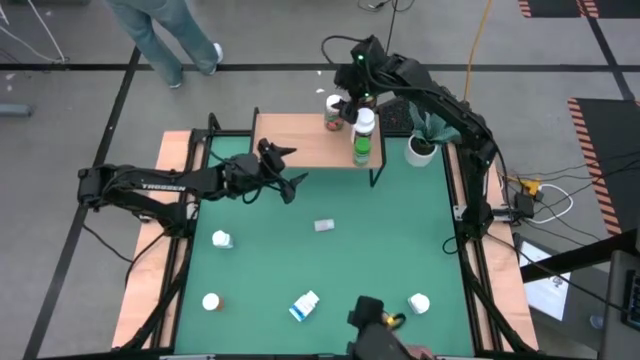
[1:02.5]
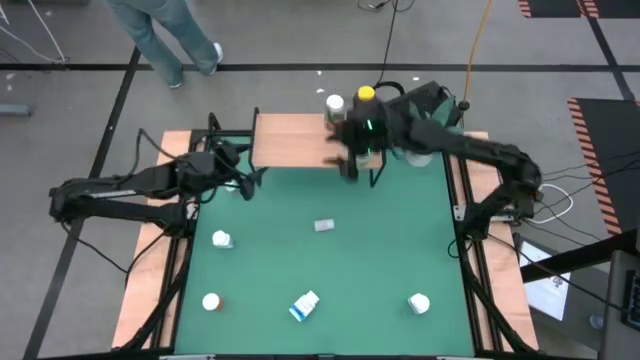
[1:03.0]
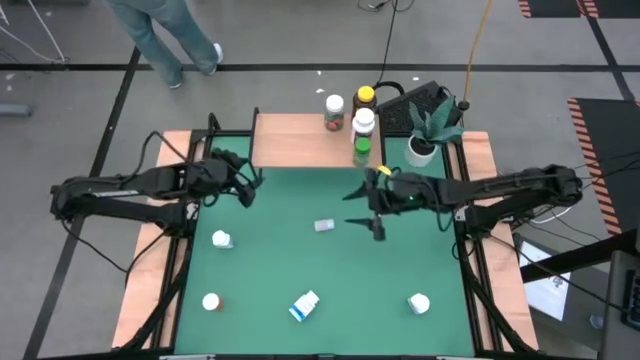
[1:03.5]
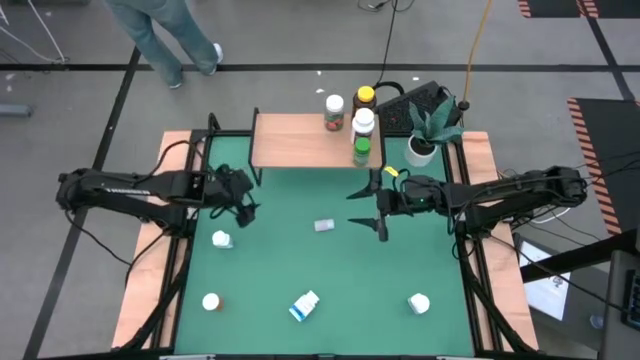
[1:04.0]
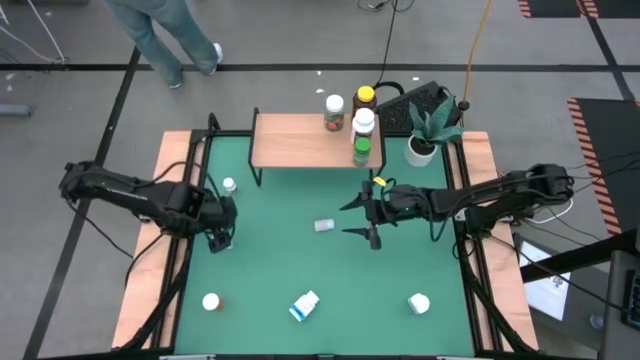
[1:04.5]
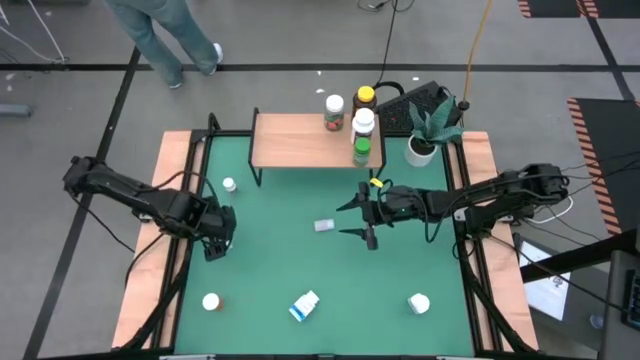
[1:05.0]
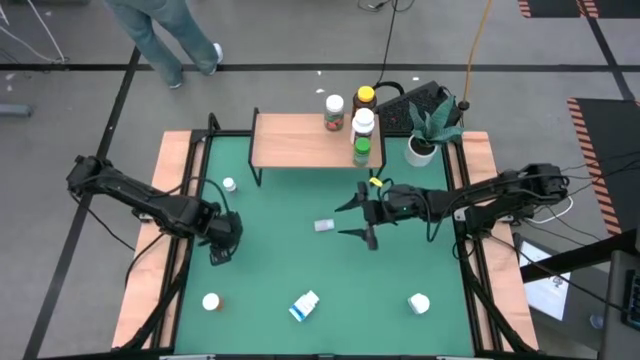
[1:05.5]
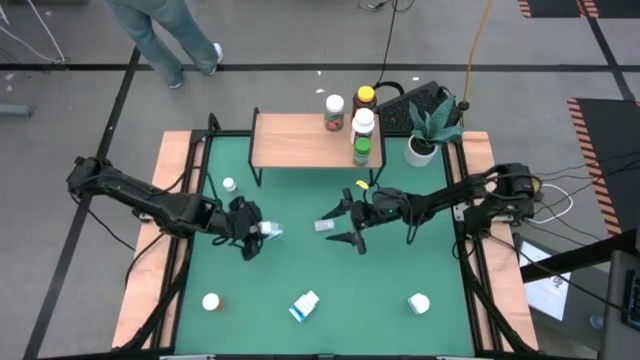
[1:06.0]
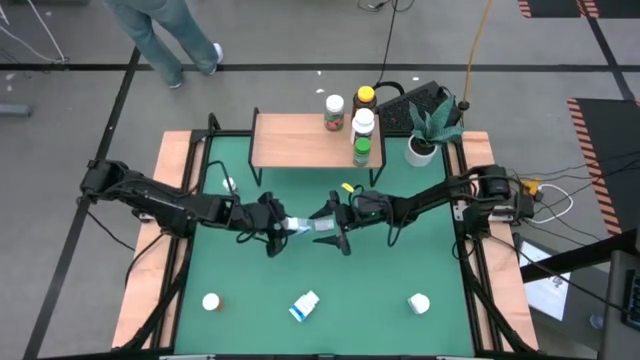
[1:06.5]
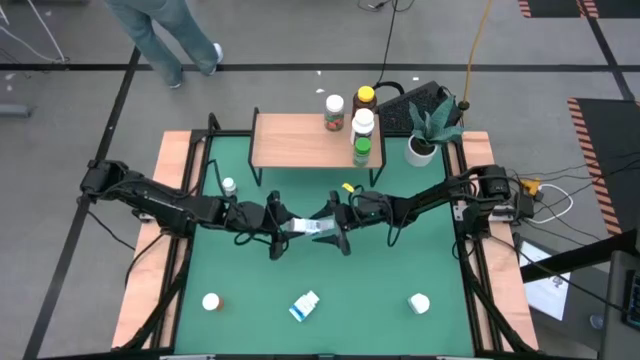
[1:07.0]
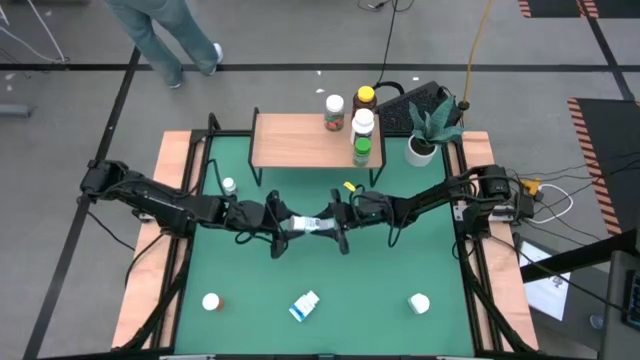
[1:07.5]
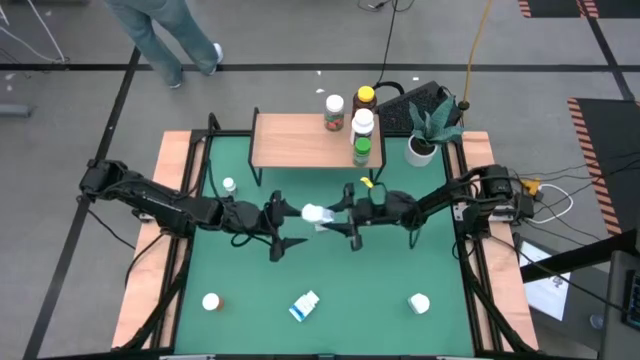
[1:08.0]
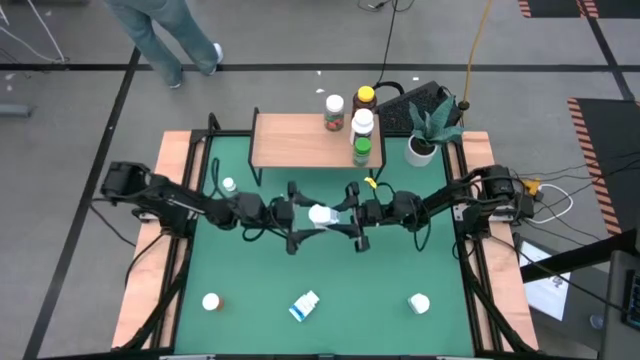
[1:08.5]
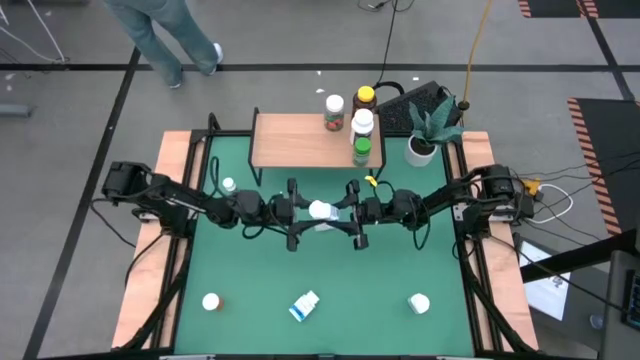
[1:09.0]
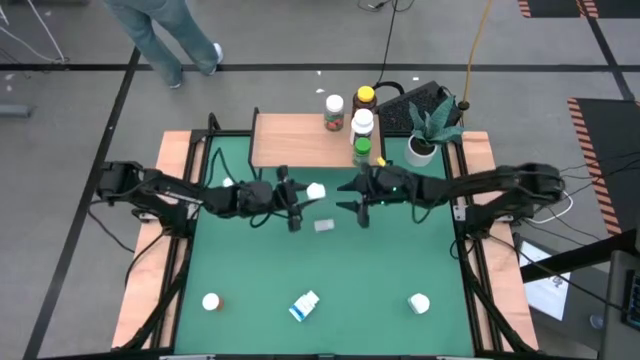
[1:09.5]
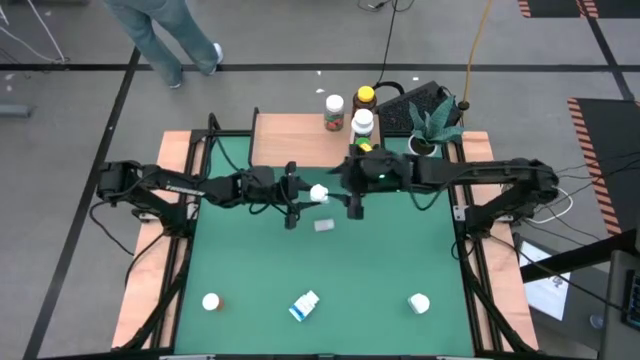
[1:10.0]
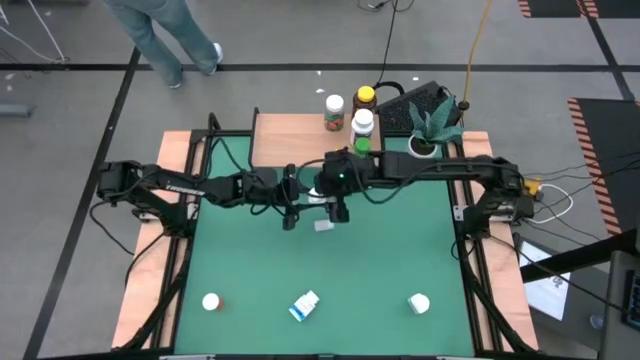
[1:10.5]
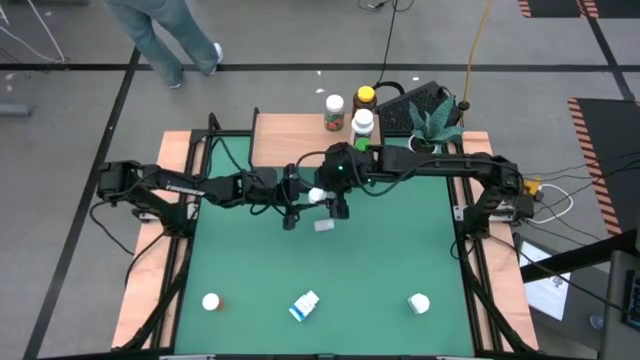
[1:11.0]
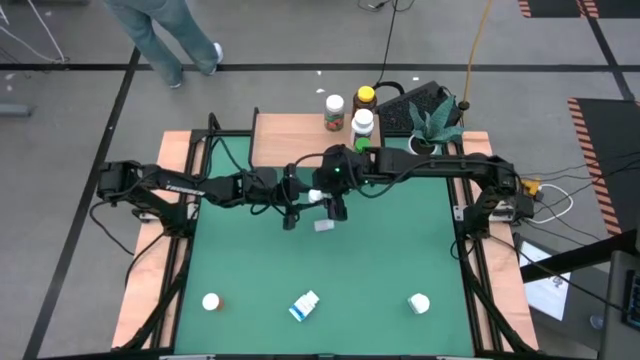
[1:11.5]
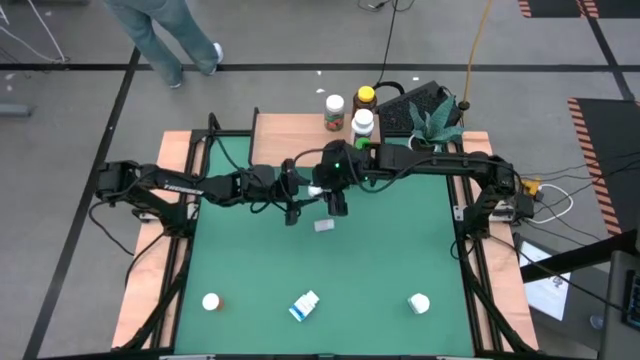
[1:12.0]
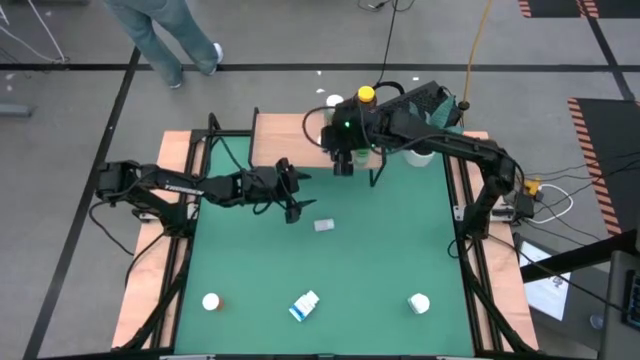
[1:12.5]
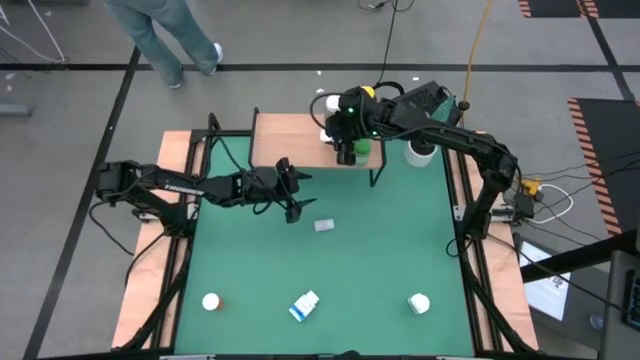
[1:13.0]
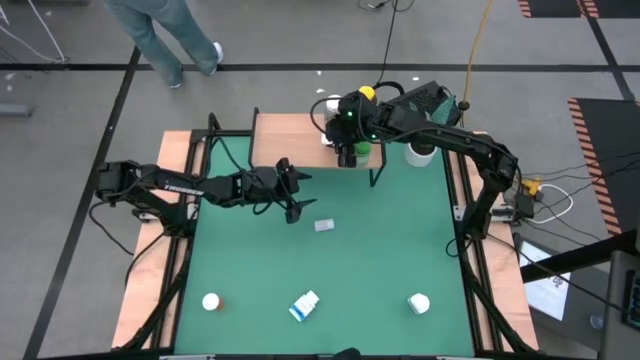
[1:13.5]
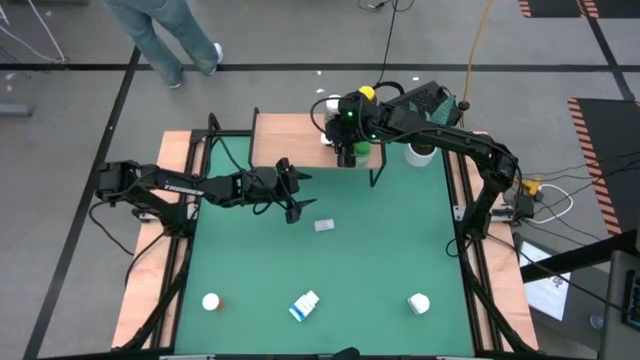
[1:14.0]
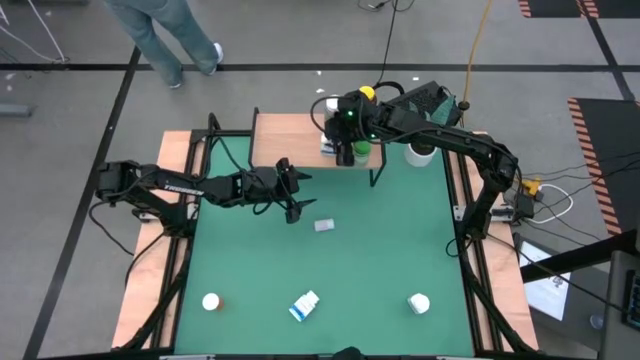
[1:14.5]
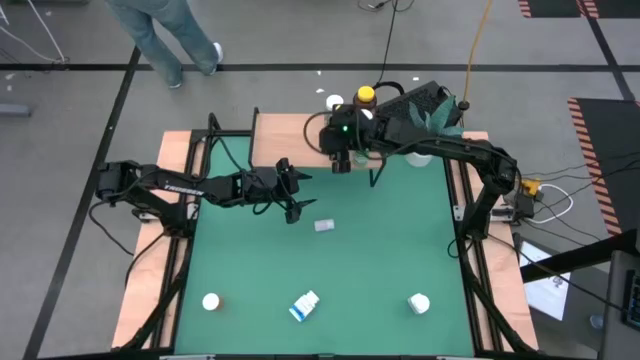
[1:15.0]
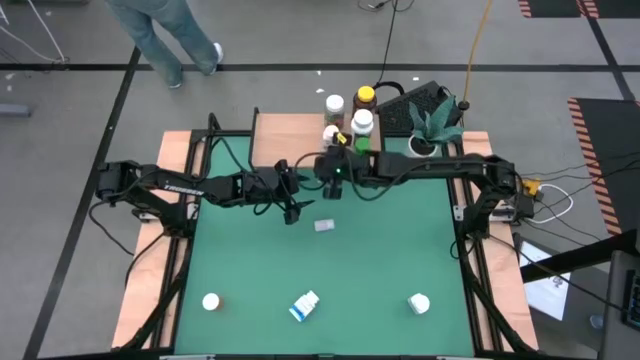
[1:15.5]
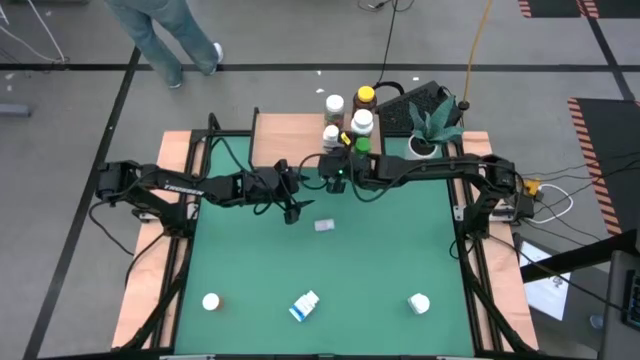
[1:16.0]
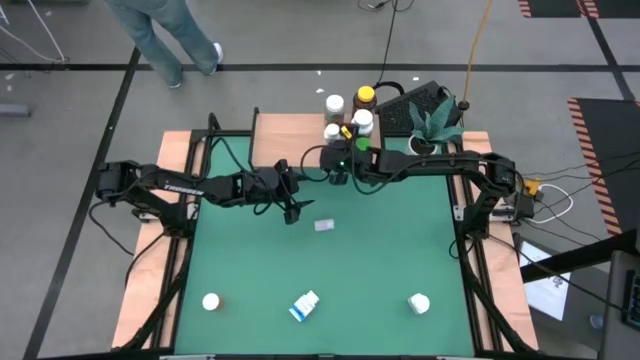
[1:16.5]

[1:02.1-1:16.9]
Task: Pick and place medicine bottles onto shelf by color
Put the top left blue white medicine bottle on the shelf

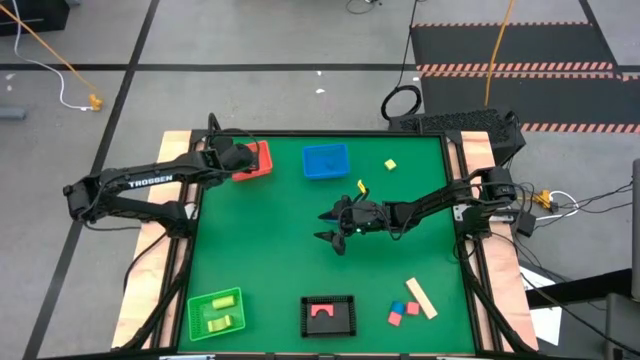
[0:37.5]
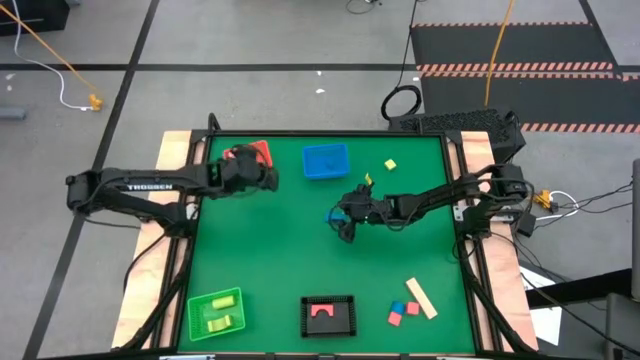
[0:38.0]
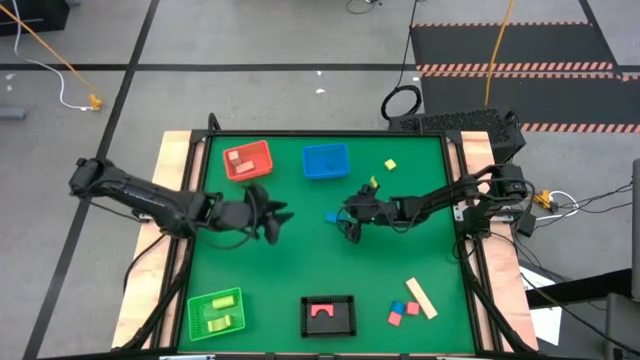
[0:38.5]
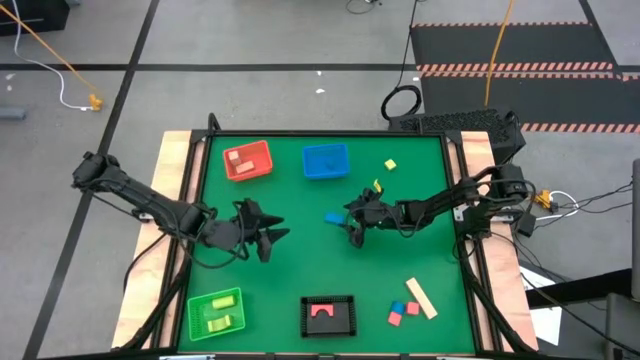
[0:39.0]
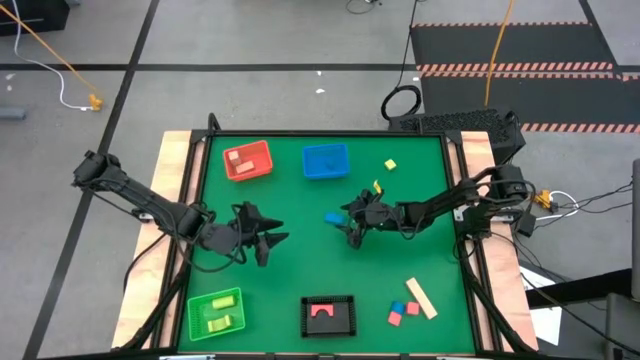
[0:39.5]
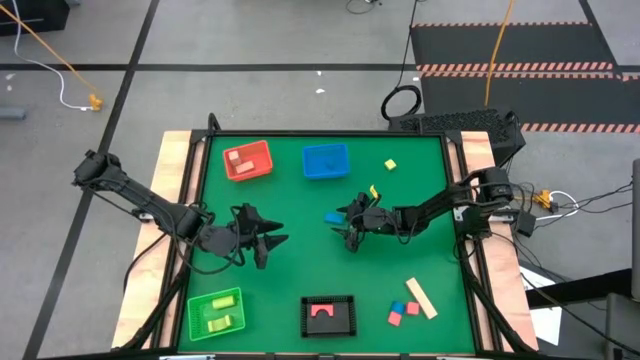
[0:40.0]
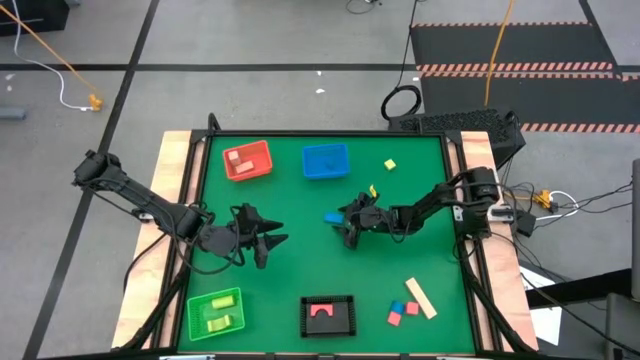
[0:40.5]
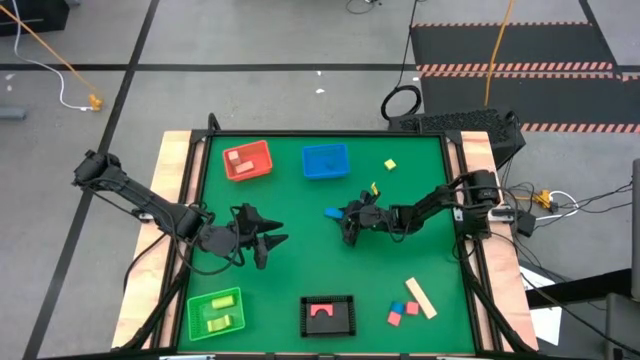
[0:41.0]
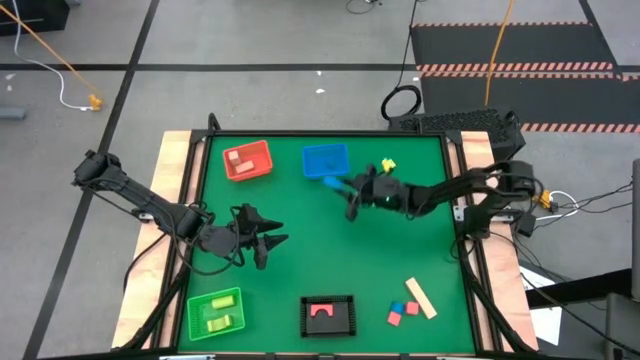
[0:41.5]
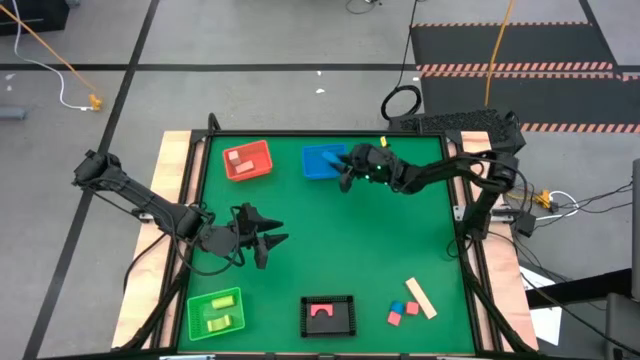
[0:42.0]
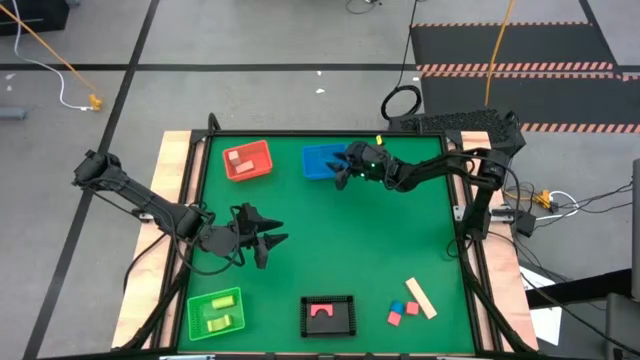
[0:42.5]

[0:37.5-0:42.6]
Task: Sort & place blocks by color
Put the top blue block into the blue bin
